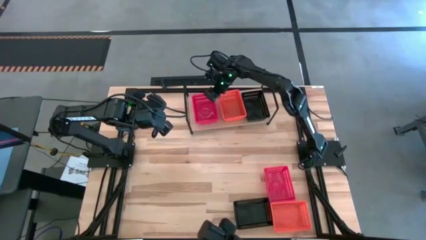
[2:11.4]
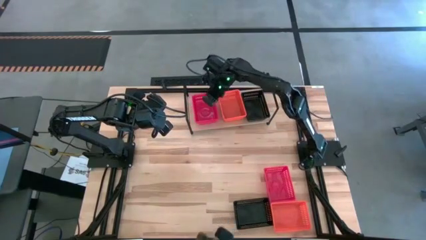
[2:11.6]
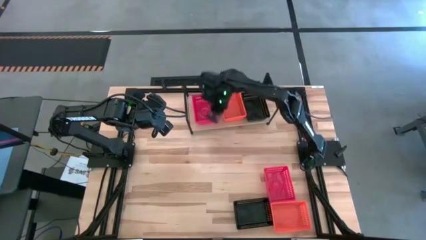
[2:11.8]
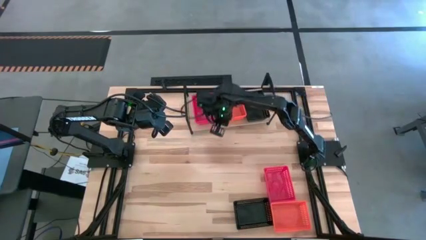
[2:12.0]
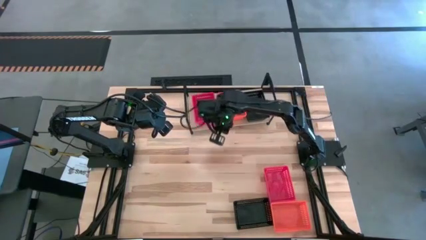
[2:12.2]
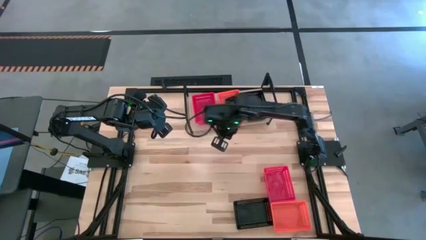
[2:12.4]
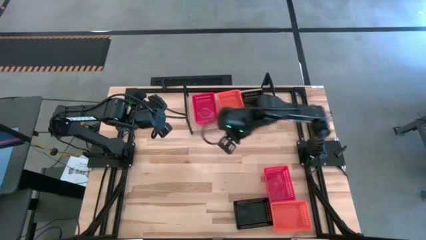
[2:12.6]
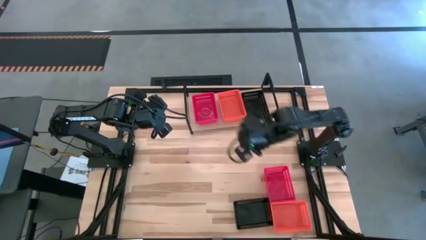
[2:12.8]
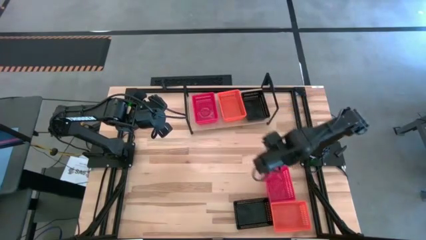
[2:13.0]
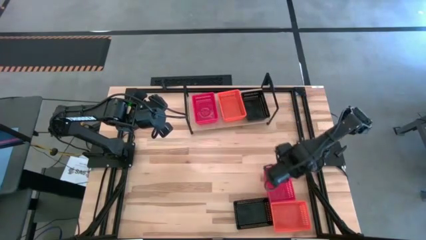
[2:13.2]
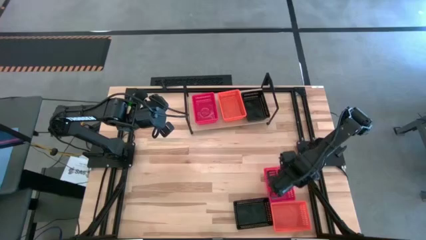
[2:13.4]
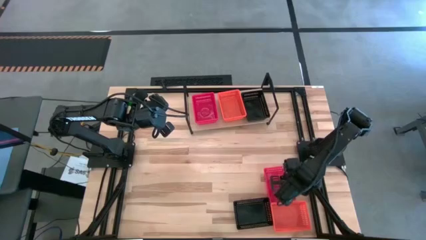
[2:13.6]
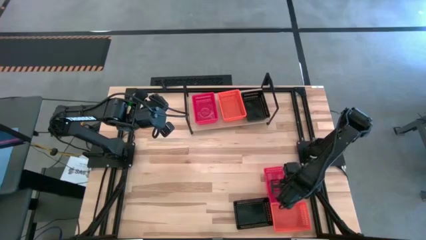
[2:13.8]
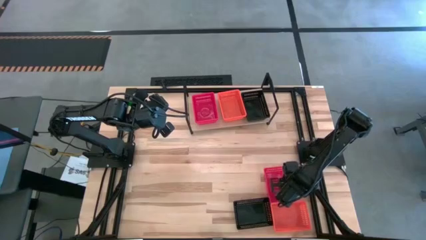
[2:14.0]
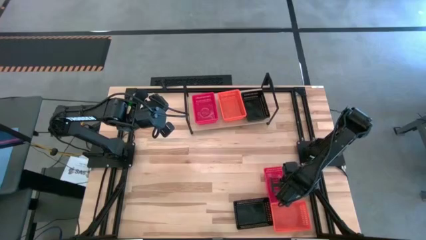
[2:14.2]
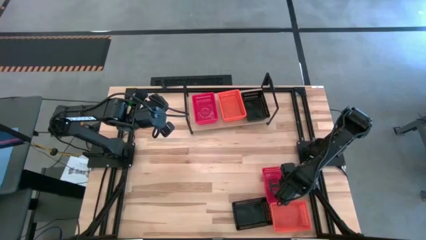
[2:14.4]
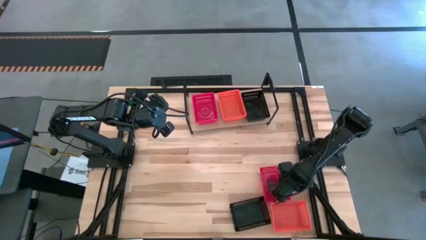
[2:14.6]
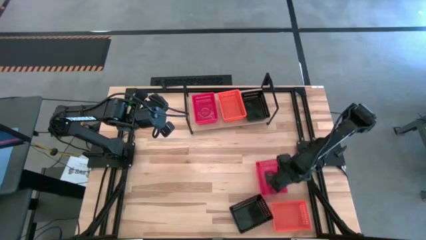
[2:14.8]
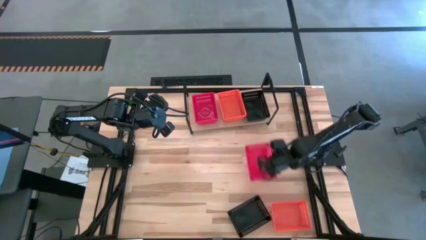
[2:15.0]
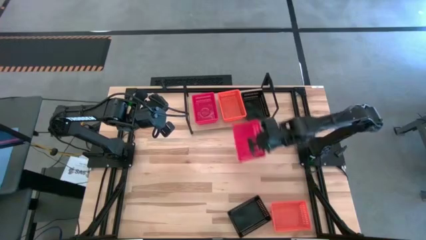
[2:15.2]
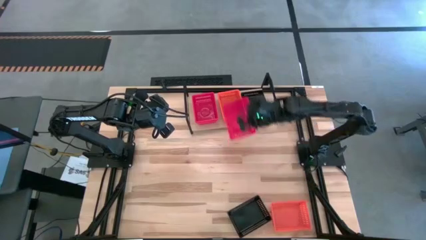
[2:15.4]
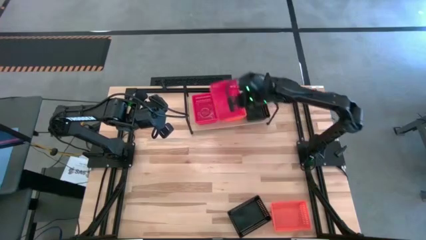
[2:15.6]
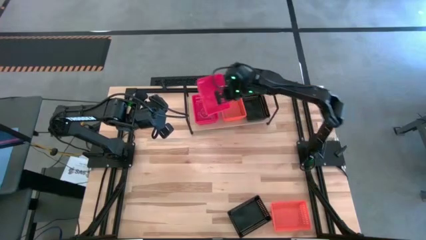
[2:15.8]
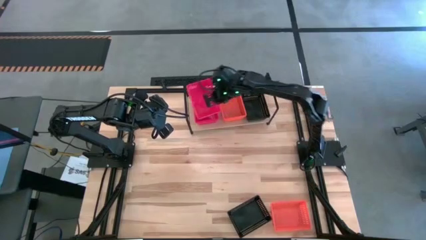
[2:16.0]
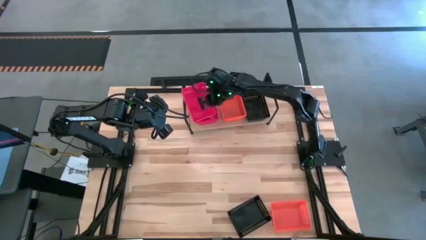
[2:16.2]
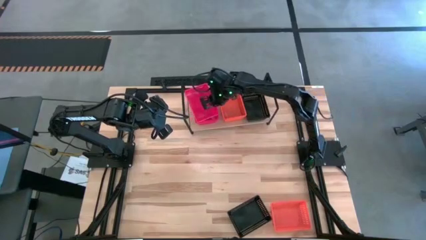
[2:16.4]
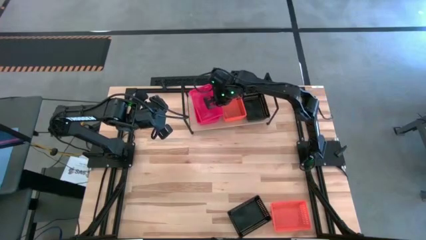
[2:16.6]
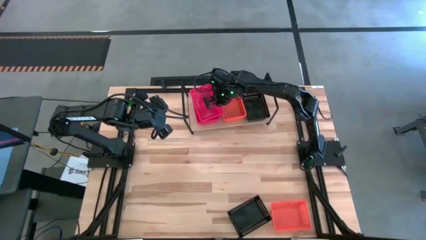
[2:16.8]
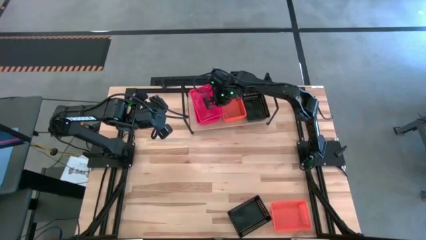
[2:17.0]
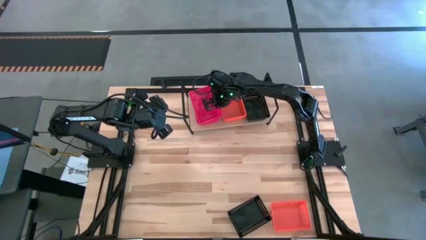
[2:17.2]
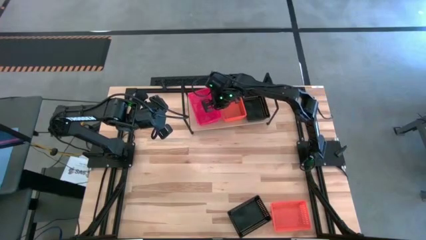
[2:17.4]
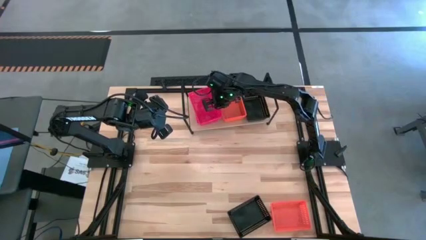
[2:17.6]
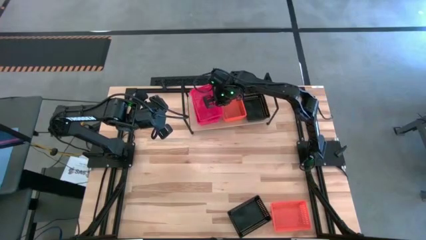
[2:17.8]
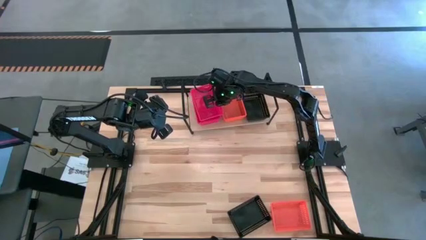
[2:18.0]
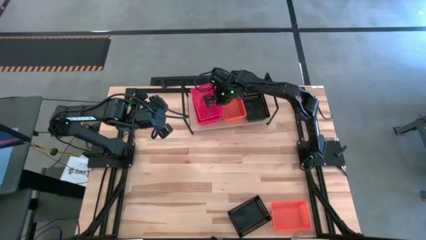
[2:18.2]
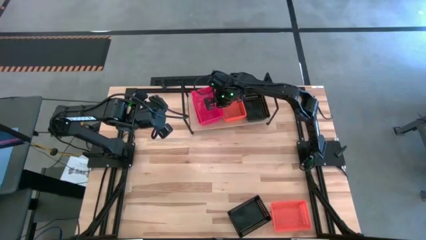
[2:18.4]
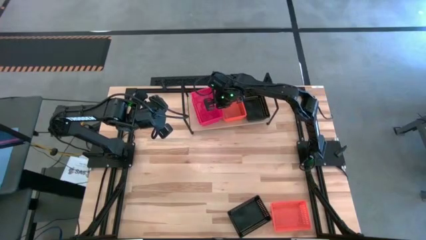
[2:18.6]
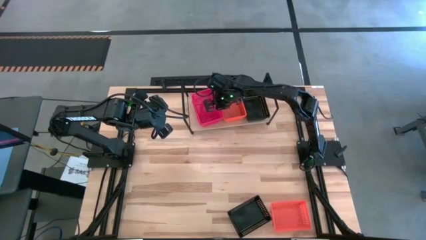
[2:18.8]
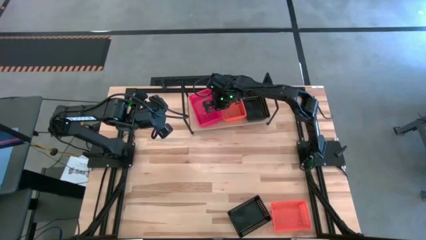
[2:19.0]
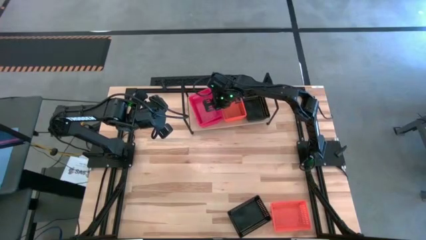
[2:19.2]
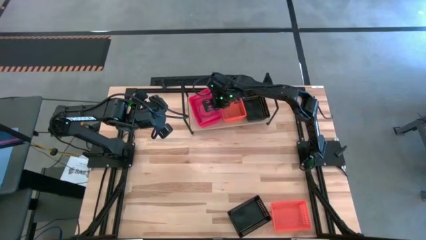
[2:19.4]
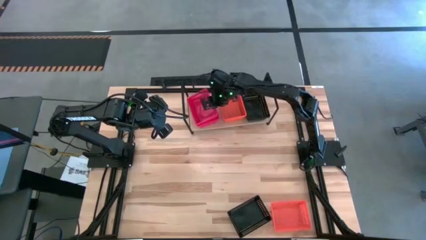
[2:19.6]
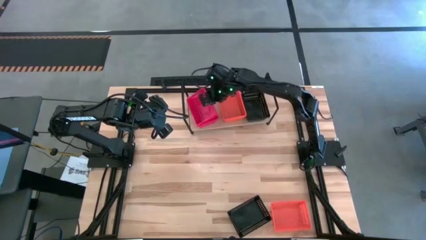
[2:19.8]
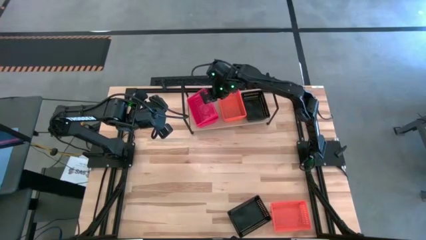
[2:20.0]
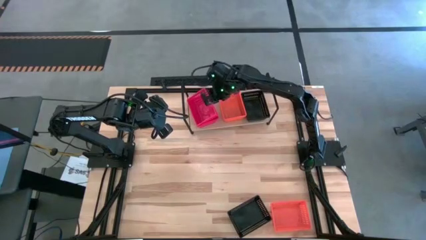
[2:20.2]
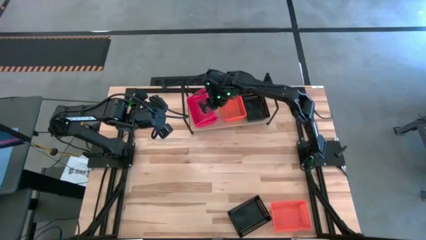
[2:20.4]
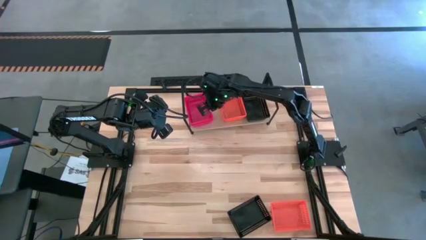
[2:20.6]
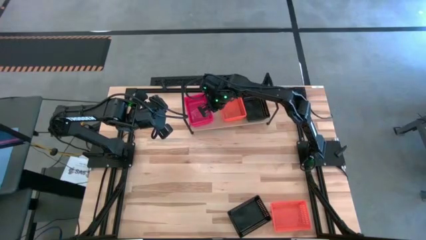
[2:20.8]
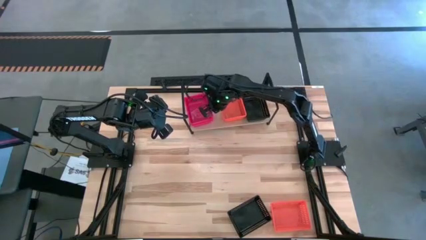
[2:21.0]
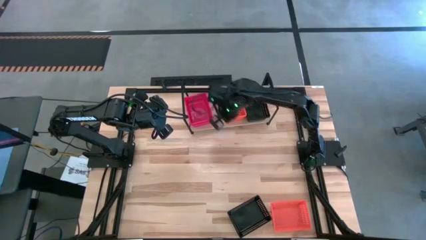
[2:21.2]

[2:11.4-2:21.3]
Task: Stack baskets on shelf by color
Stack the red bin into the red bin on the shelf
